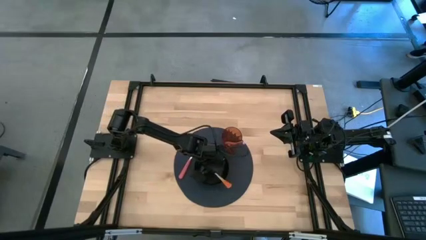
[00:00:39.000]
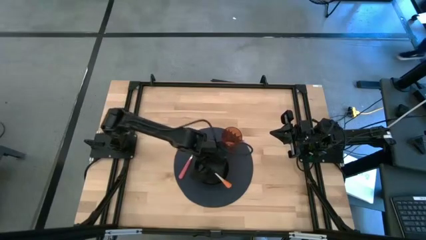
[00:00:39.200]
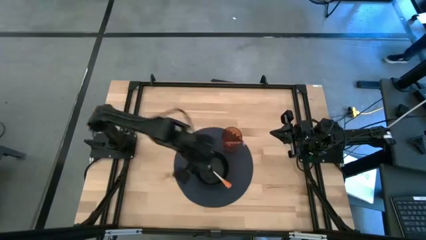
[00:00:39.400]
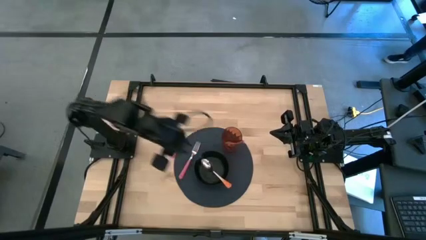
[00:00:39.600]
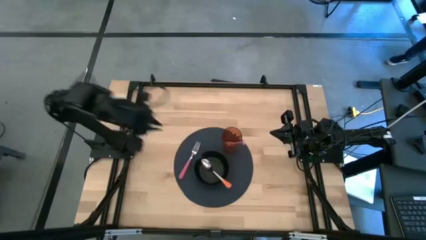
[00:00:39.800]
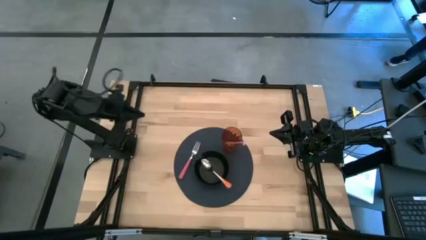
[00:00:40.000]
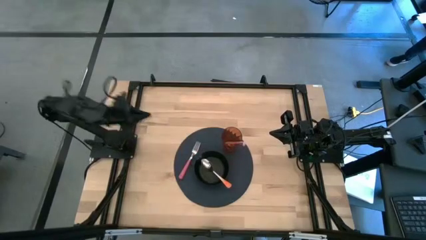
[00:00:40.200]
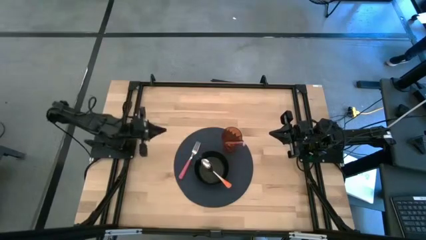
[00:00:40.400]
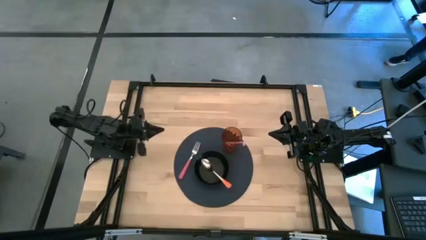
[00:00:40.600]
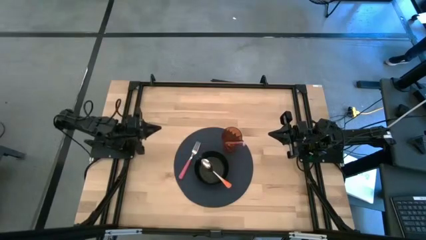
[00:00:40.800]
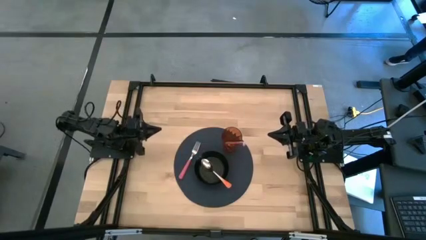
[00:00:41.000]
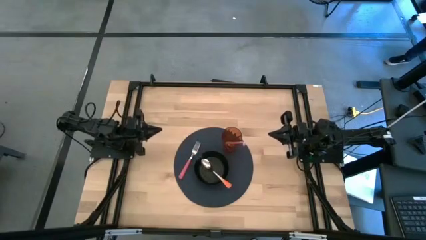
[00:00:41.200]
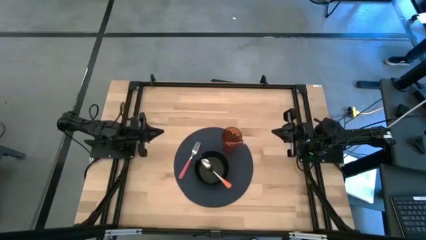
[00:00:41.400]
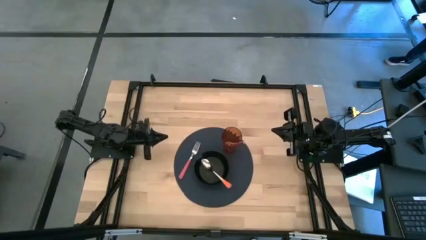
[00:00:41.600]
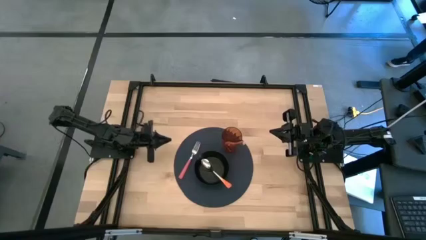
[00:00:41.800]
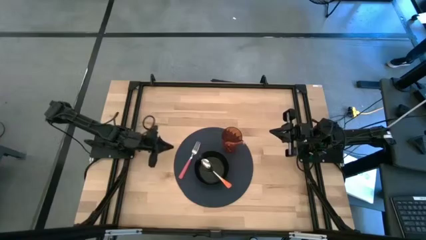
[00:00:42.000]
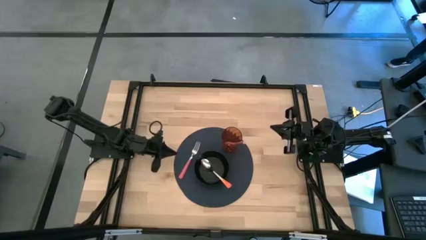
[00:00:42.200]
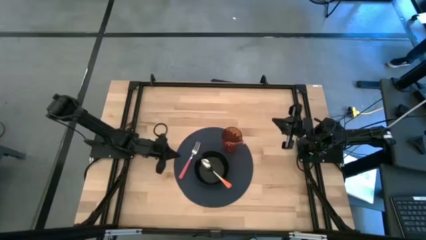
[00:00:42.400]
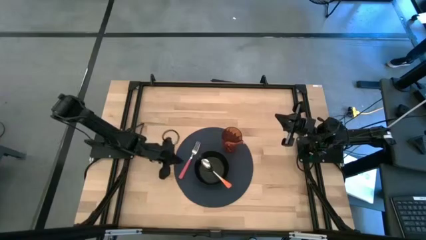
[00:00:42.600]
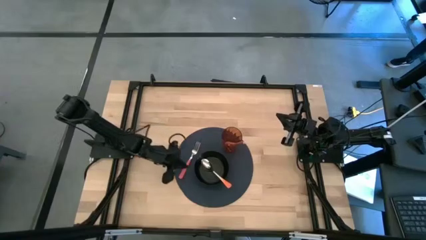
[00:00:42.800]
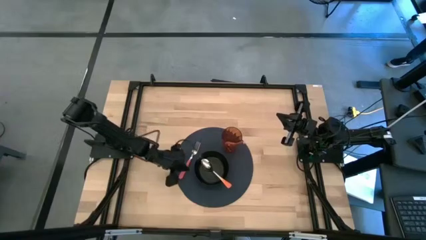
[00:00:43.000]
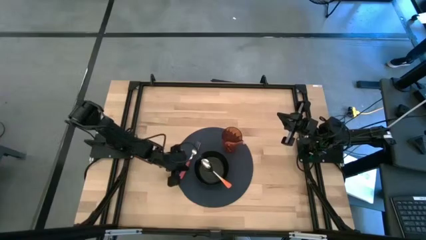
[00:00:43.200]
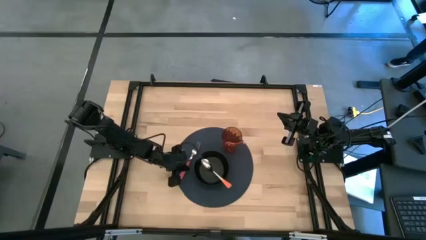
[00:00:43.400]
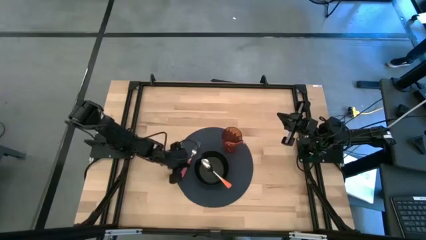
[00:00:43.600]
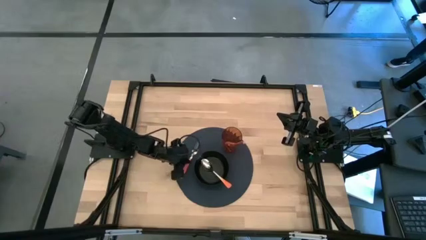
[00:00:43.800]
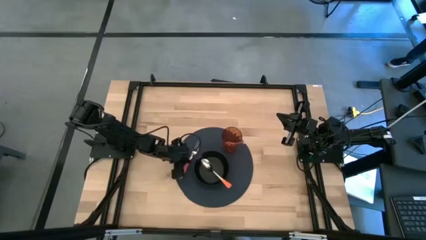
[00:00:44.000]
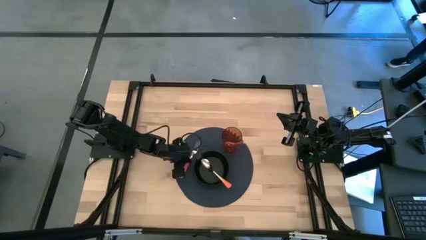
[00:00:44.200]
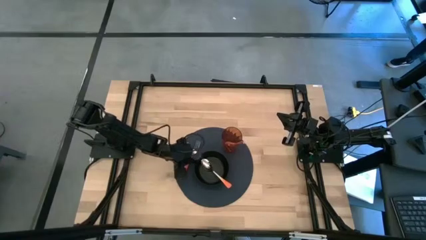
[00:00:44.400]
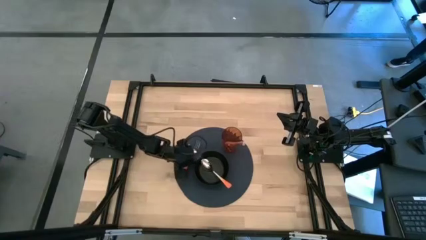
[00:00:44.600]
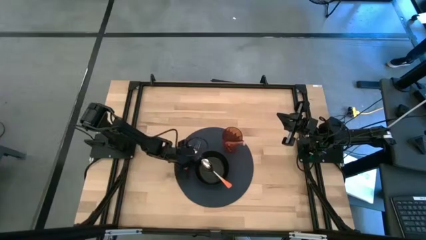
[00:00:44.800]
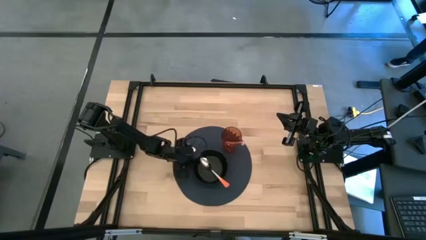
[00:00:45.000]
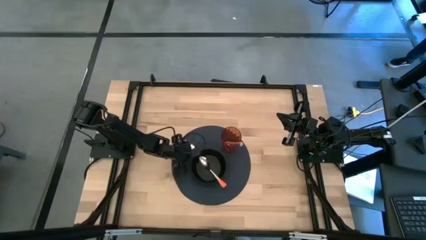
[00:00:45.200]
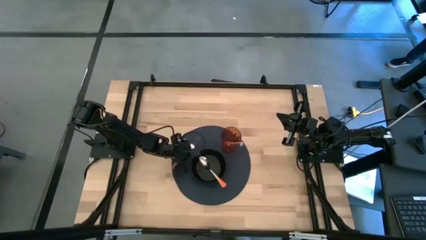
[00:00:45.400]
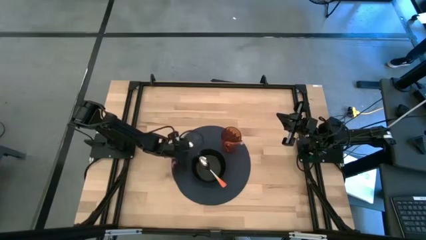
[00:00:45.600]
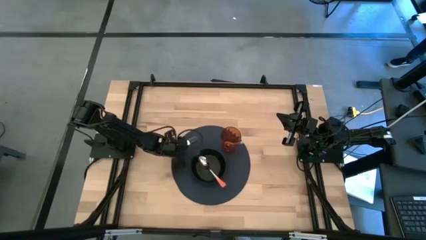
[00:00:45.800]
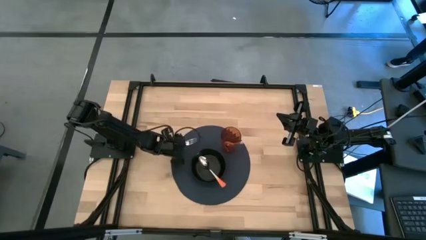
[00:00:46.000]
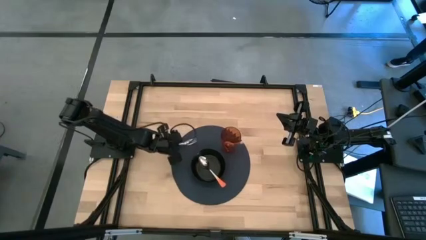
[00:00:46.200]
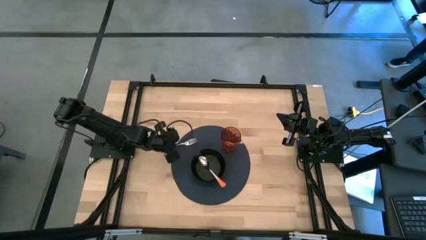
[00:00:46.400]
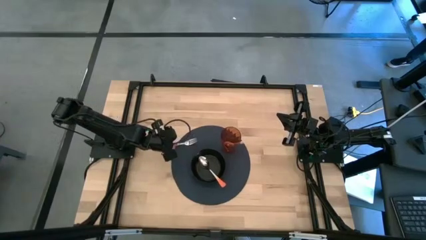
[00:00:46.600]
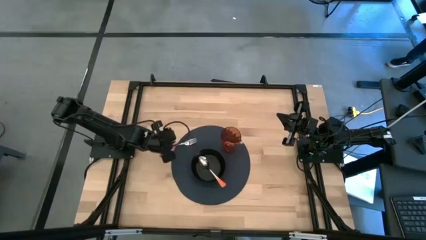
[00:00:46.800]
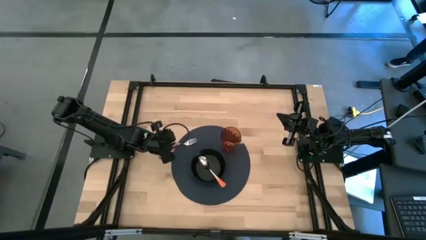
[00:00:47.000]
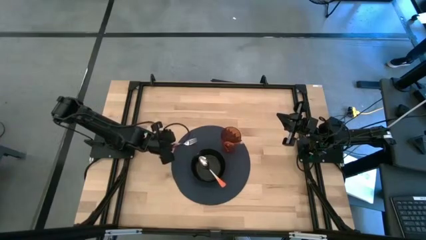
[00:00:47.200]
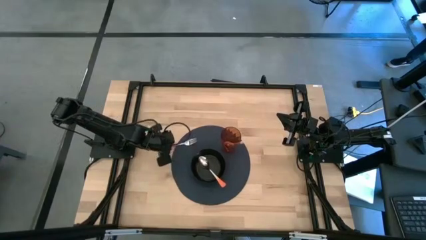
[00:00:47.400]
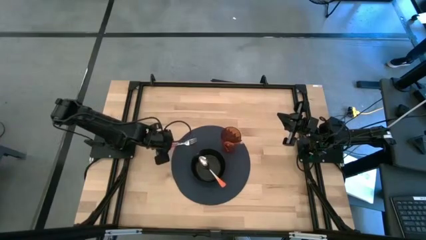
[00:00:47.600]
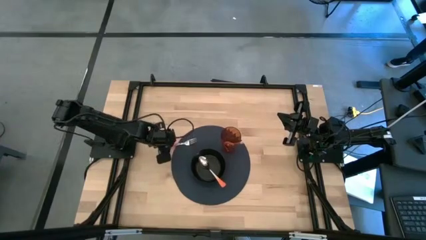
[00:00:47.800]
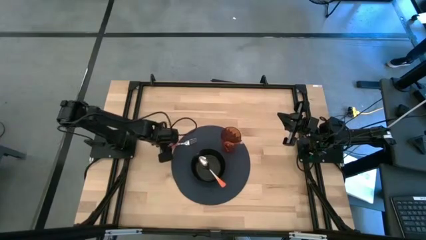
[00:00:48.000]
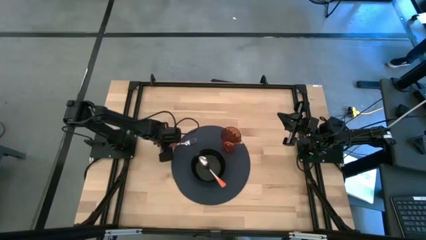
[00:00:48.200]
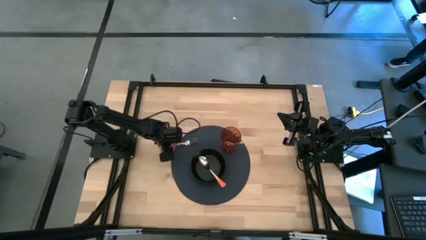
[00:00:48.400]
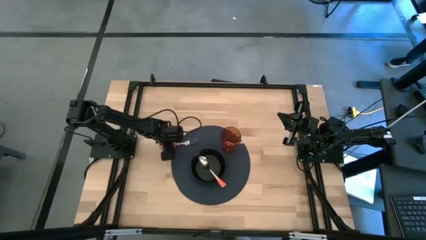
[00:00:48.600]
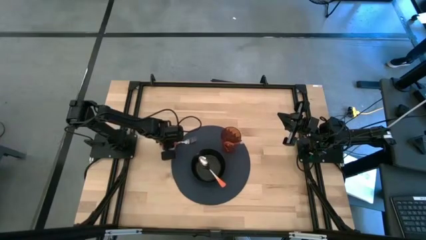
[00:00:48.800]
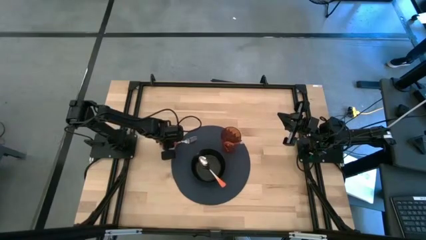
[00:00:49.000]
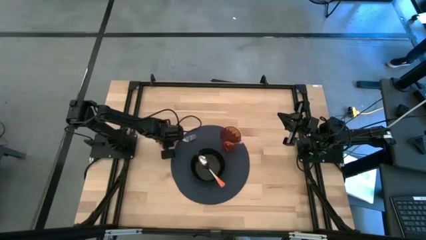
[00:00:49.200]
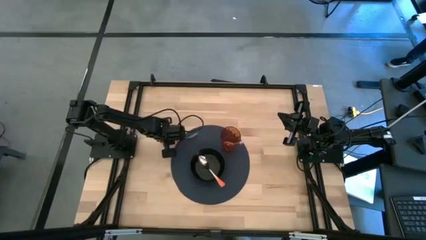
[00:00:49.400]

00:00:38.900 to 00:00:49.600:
Task: Pick & Place Utensil
Put the pink fork into the black bowl

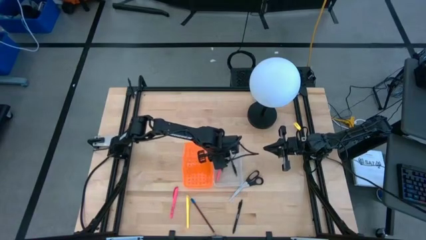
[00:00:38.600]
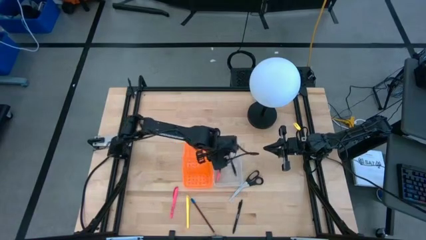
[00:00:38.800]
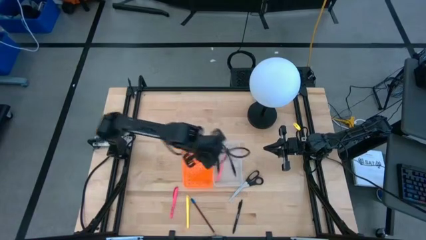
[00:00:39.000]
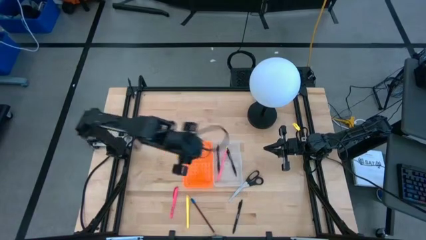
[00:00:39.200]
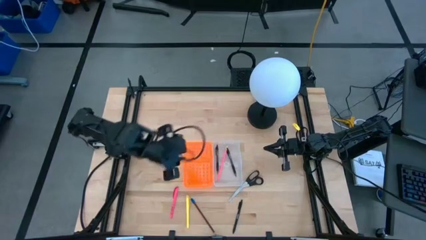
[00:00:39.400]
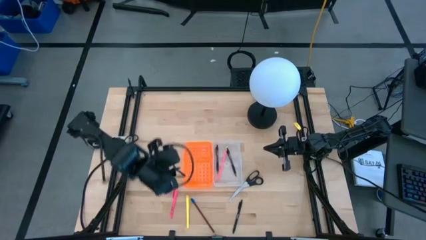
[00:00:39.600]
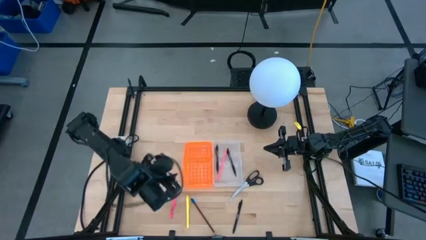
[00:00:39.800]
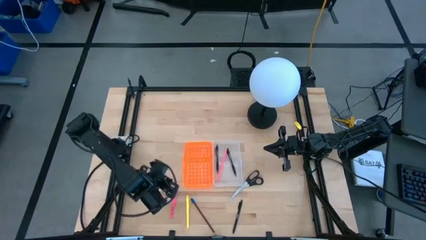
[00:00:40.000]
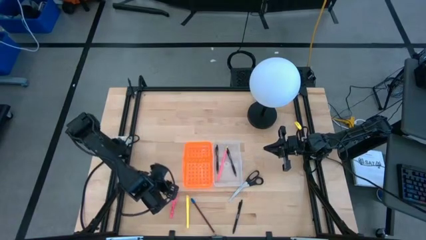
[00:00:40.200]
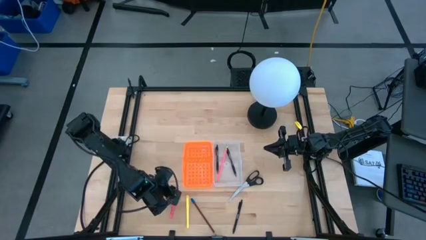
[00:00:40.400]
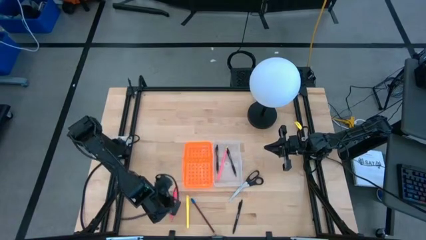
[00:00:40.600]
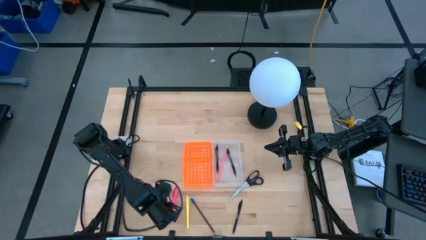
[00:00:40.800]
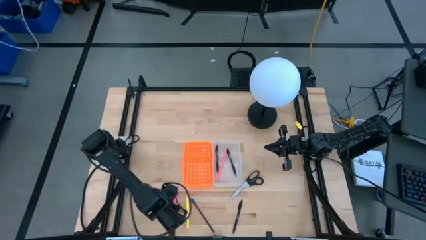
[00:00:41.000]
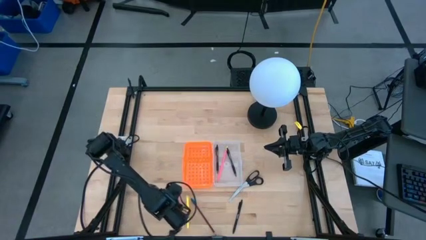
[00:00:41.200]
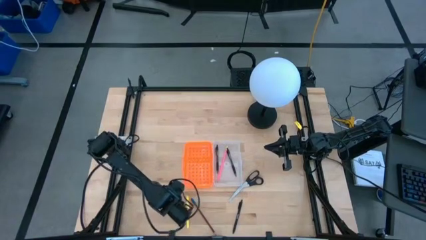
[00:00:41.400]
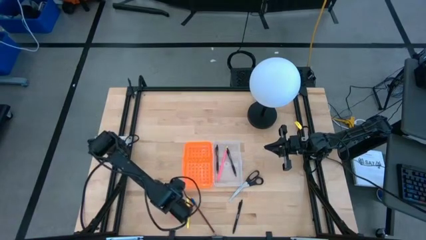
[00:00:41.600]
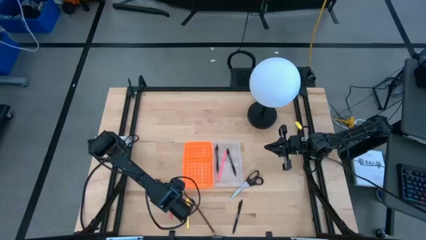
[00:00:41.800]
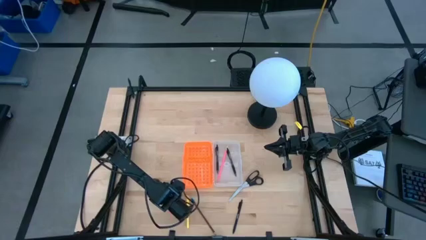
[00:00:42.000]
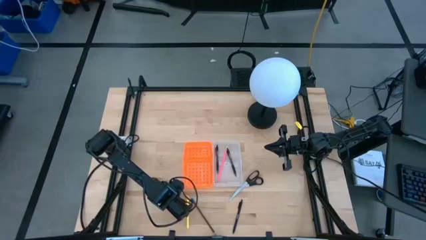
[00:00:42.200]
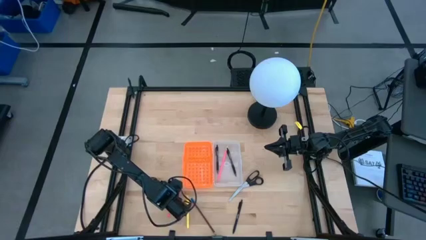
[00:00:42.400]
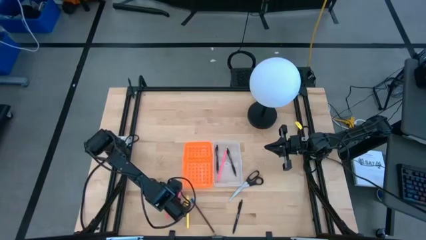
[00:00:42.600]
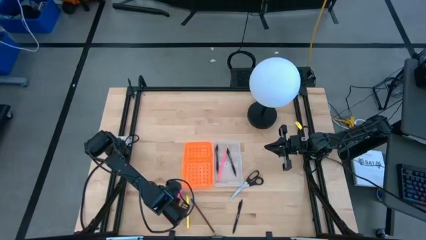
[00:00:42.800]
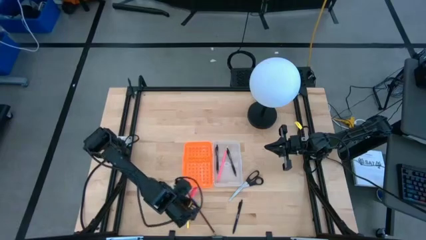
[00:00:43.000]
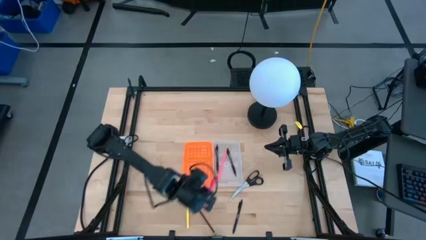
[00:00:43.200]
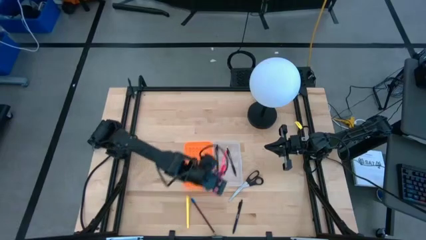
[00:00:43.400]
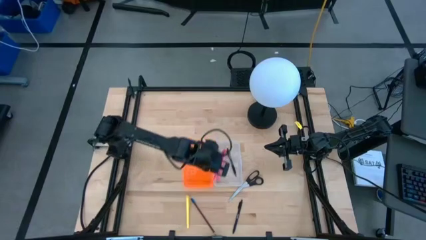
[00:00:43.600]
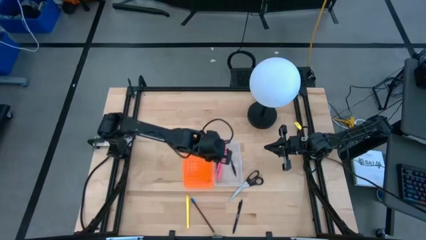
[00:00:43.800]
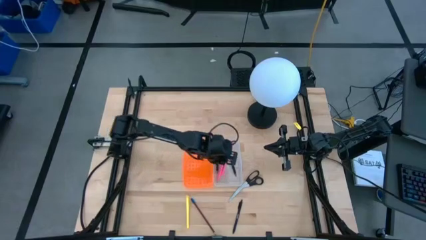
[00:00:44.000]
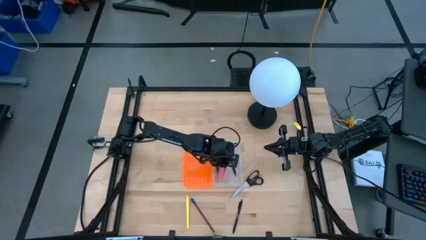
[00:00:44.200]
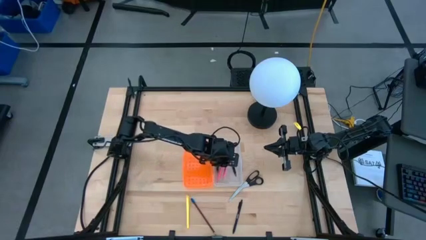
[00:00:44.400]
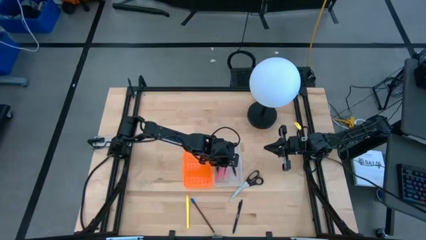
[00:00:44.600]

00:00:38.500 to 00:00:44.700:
Task: Pick & place school supplies into a supply box
Put the pink highlighter into the orange supply box
